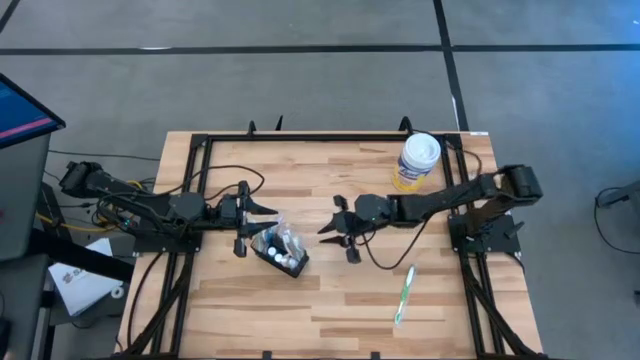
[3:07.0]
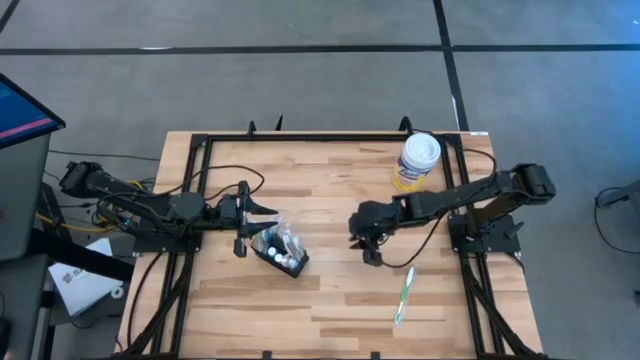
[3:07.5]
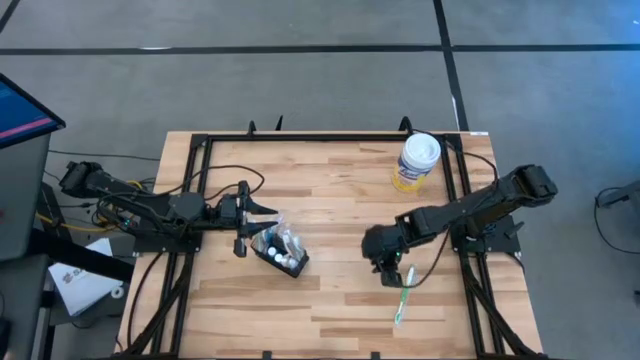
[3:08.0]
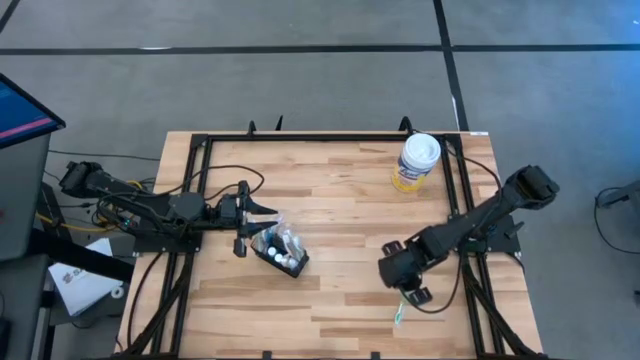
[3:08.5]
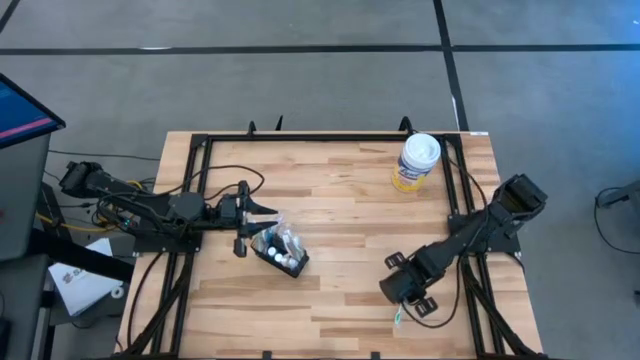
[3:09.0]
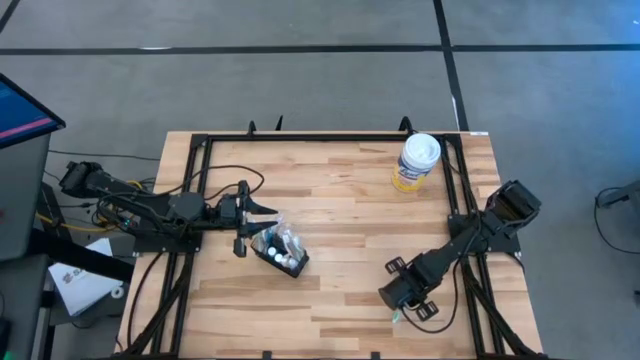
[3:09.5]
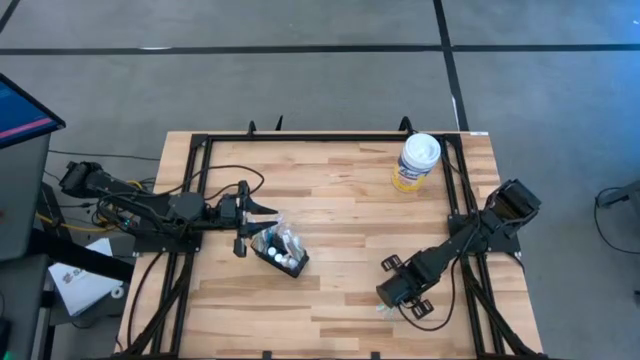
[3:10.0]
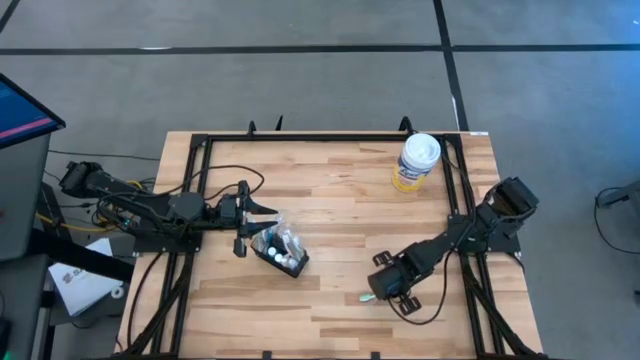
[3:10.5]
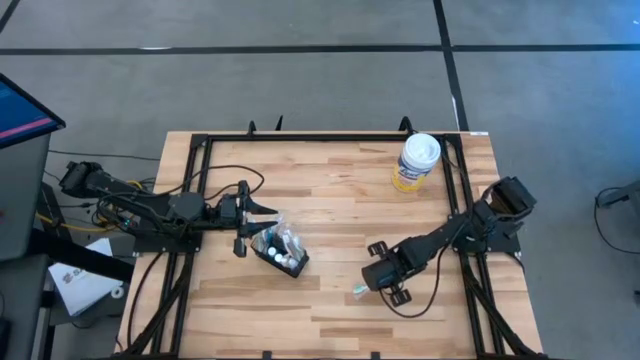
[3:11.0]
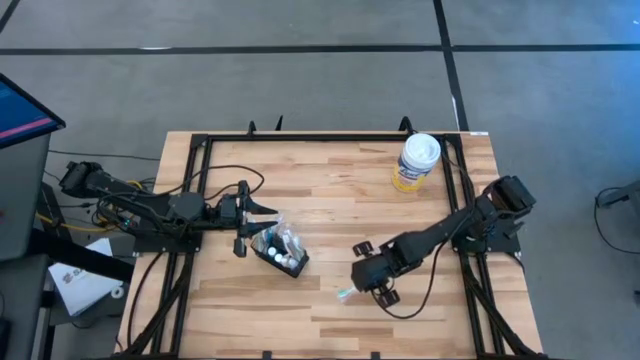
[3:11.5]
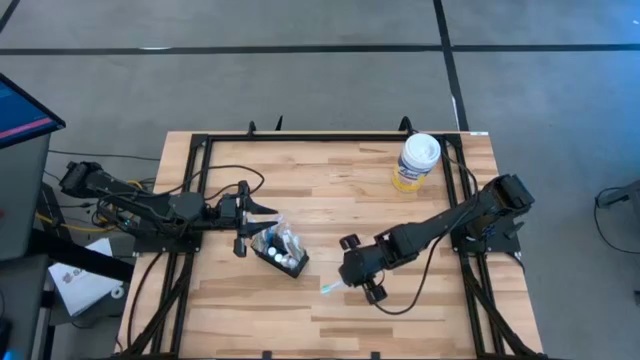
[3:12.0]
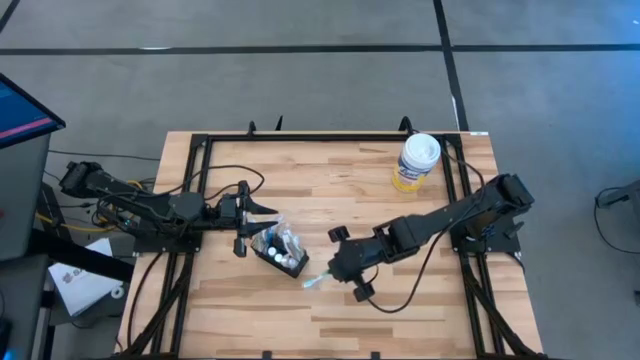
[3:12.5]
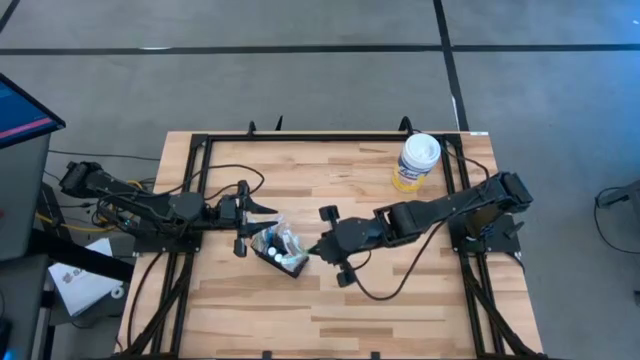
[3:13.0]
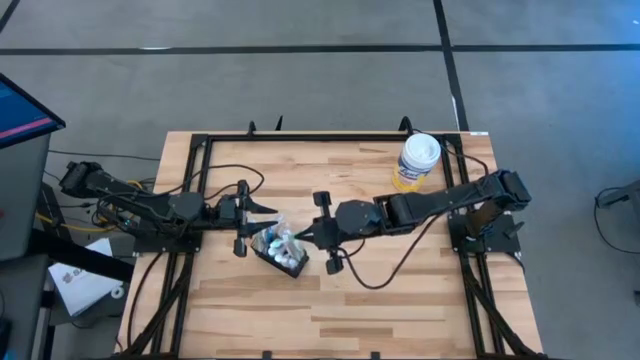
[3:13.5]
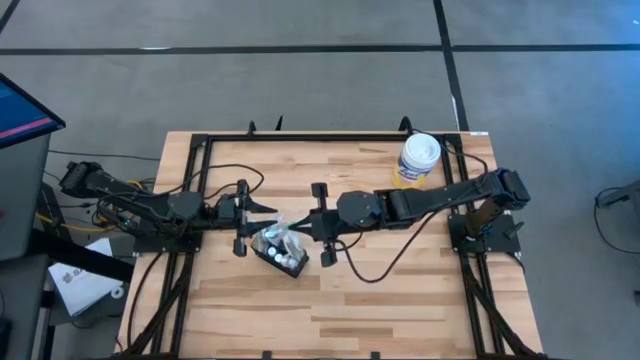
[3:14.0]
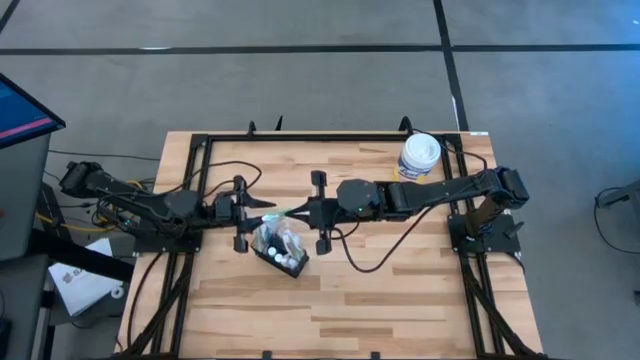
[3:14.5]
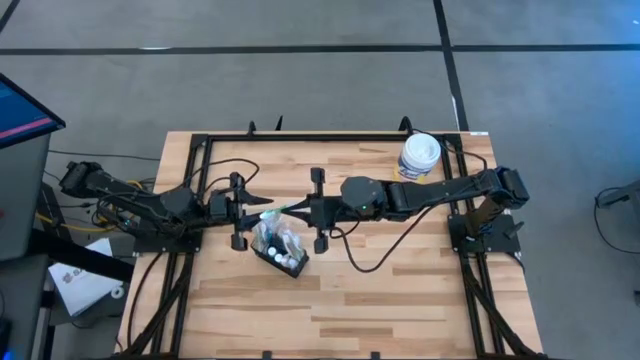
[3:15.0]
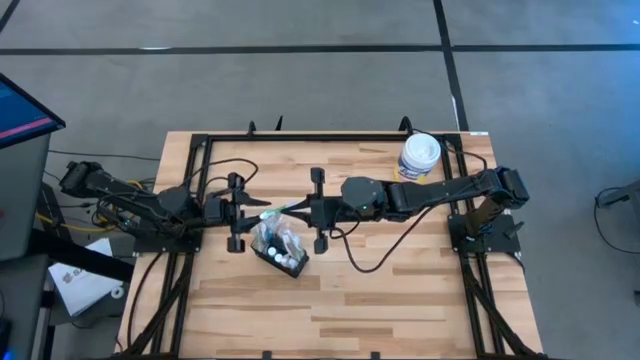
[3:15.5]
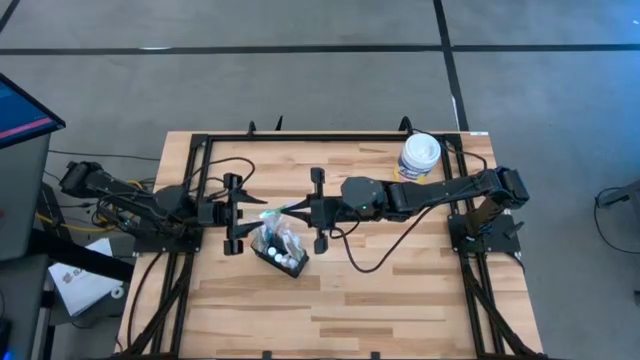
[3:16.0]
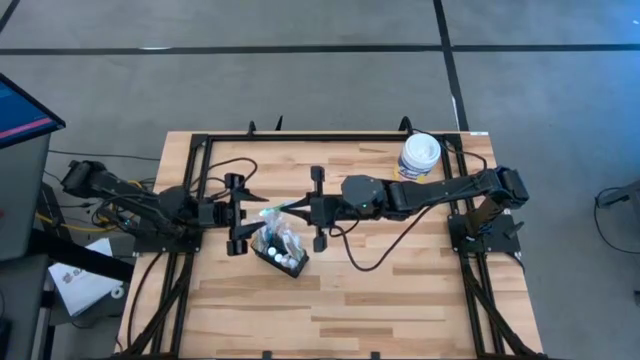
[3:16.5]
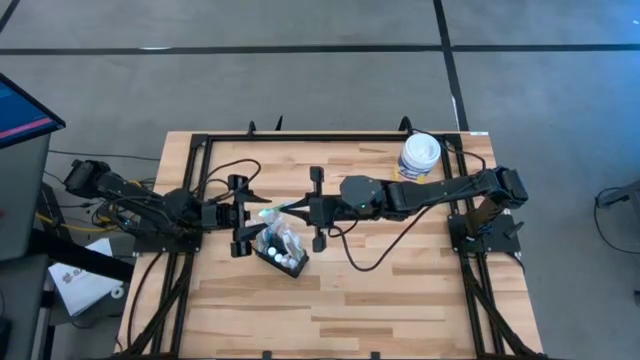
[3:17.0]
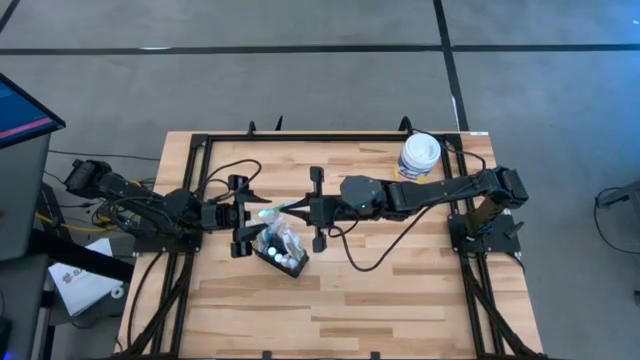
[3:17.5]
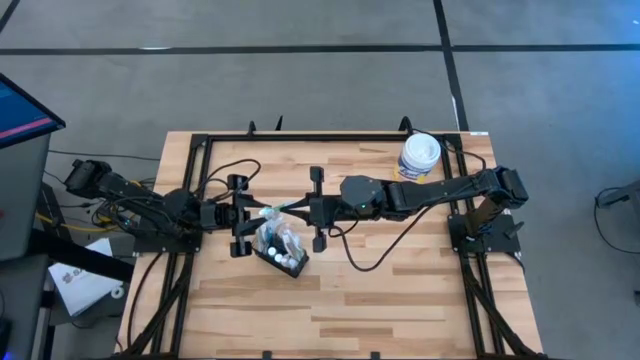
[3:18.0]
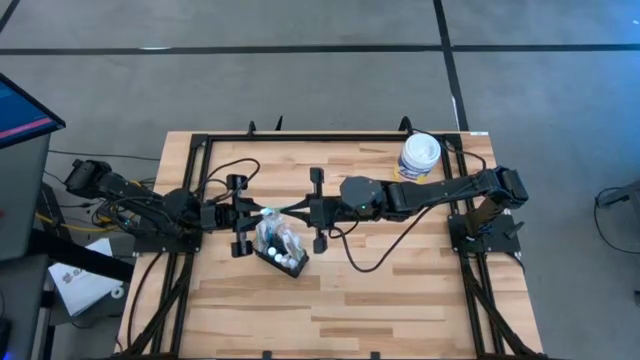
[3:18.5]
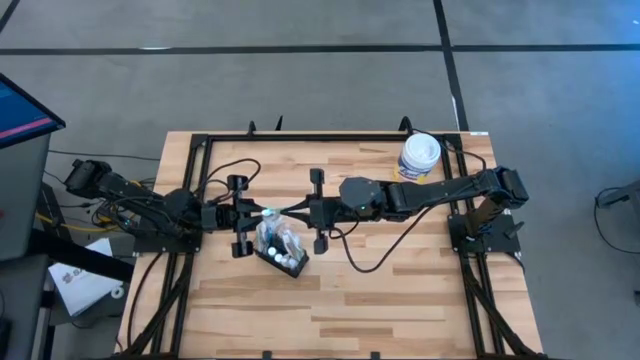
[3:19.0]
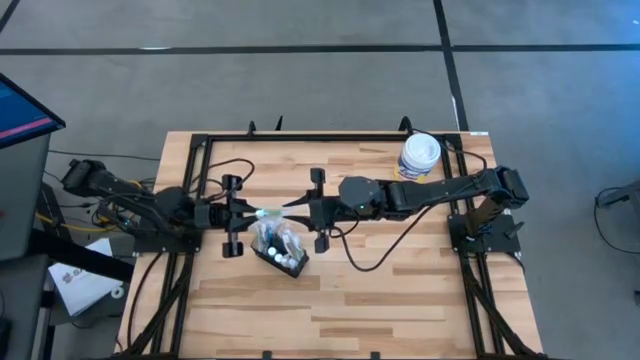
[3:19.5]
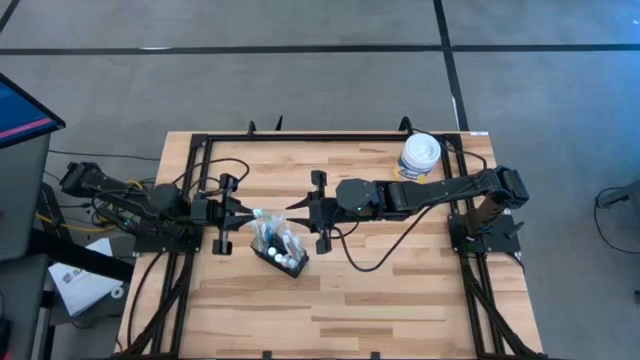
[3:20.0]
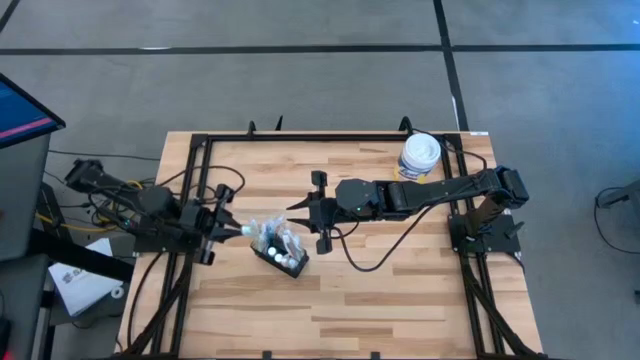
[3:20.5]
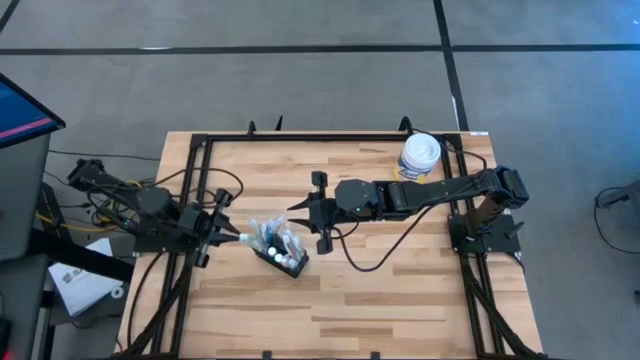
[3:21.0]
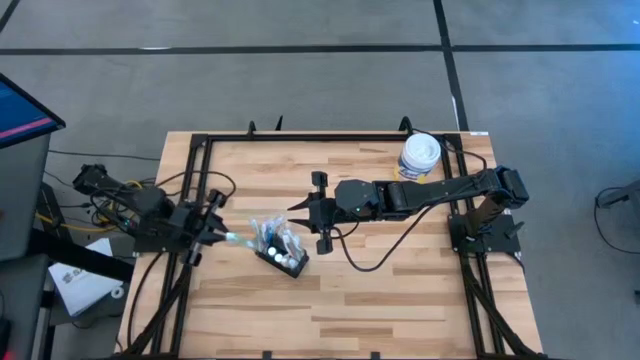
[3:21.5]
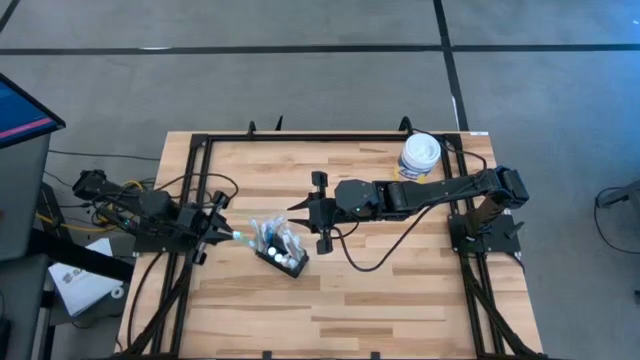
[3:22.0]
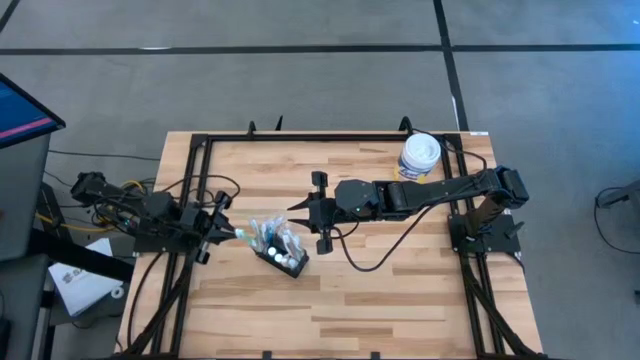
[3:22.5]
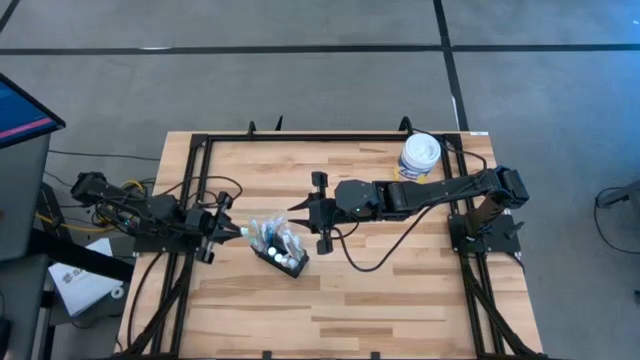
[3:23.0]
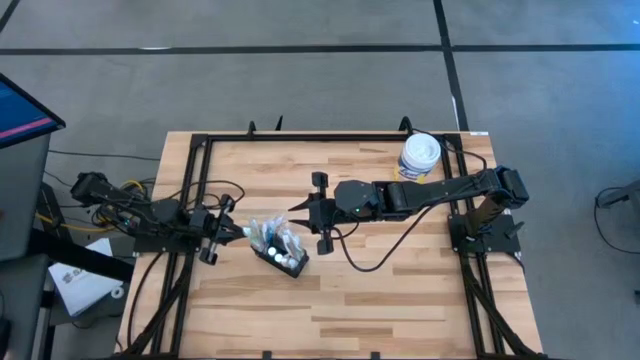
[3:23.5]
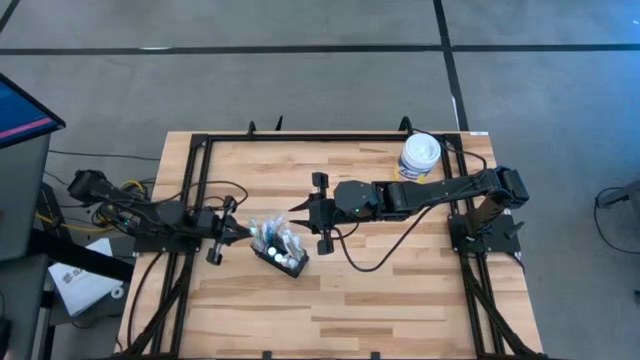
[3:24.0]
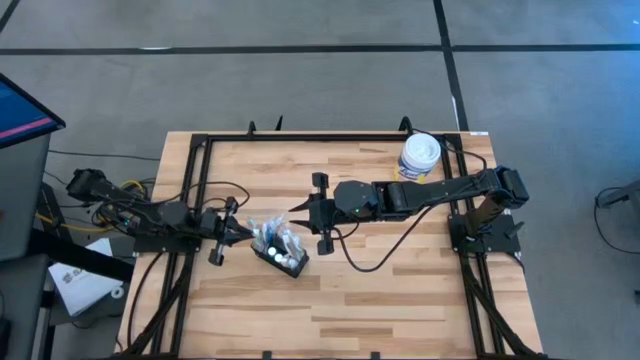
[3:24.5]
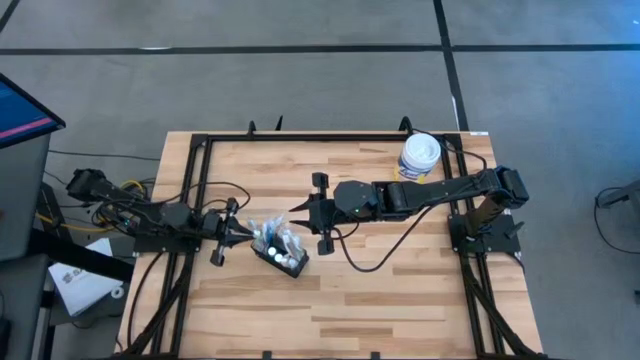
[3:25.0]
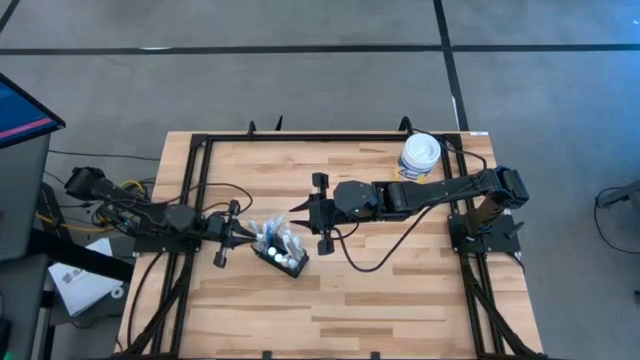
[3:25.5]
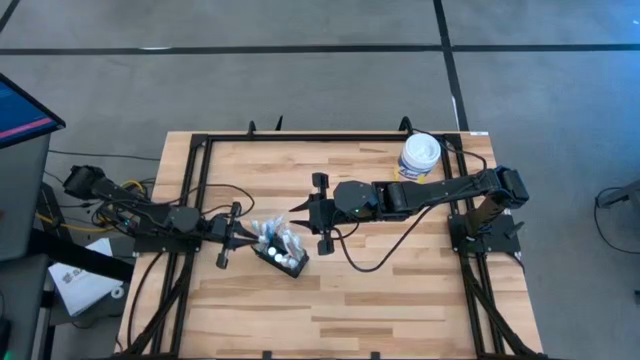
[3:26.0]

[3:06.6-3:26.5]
Task: Pick & Place toothbrushing station
Put the green toothbrush into the left compartment of the wire organizer

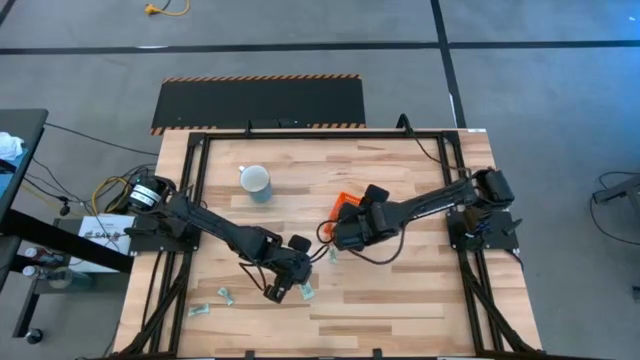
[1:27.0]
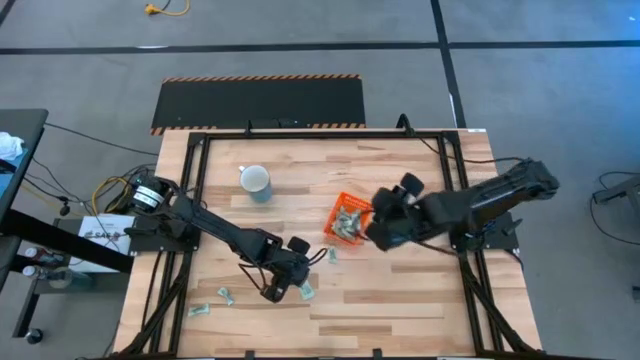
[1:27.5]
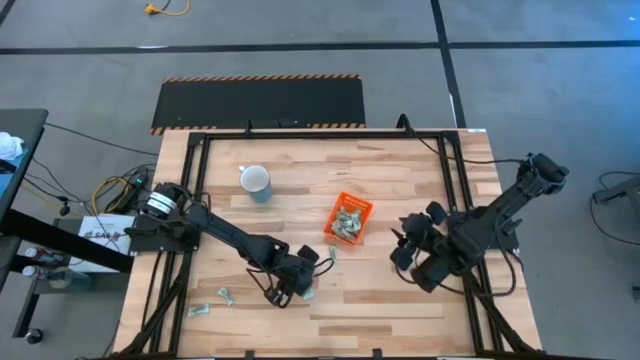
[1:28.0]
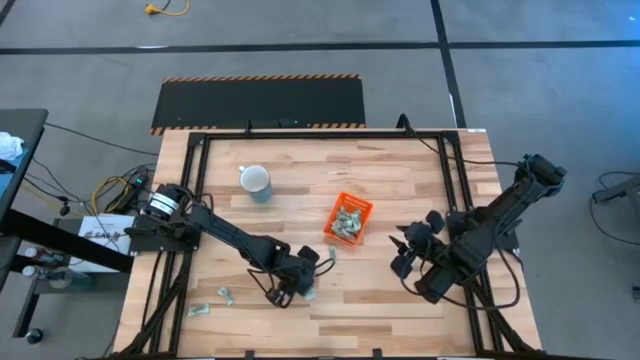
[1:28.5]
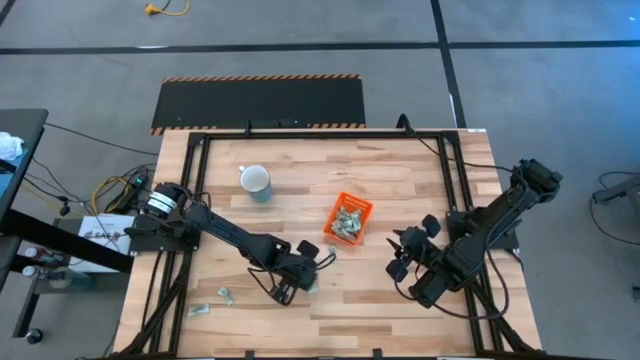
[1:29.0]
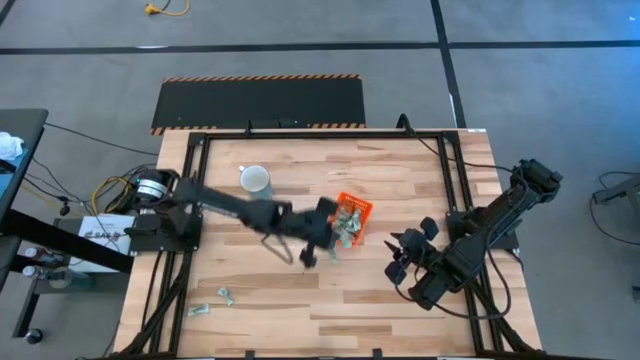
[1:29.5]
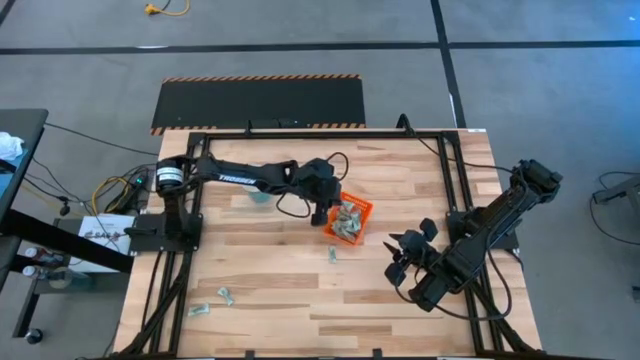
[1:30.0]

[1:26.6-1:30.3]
Task: Pick and place Stevia / Truvia into bins
Put the stevia packet into the basket
